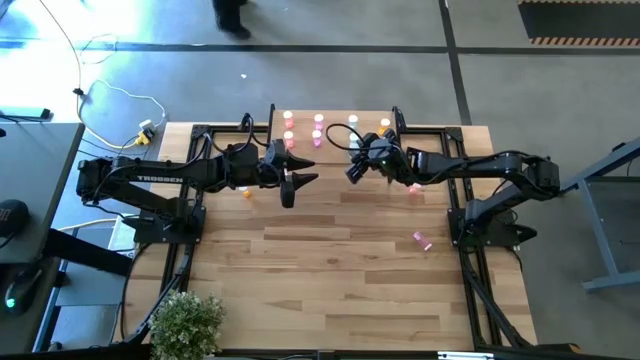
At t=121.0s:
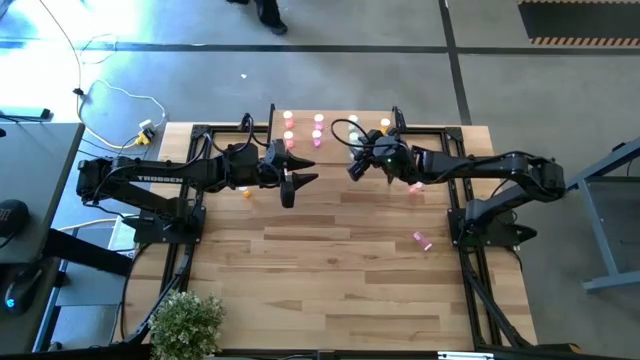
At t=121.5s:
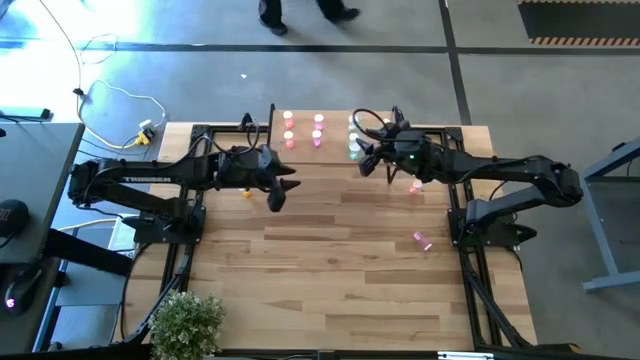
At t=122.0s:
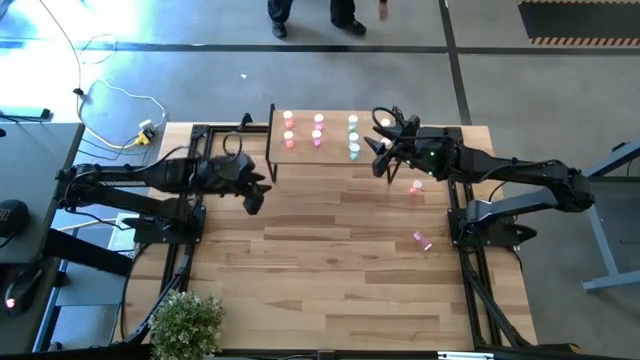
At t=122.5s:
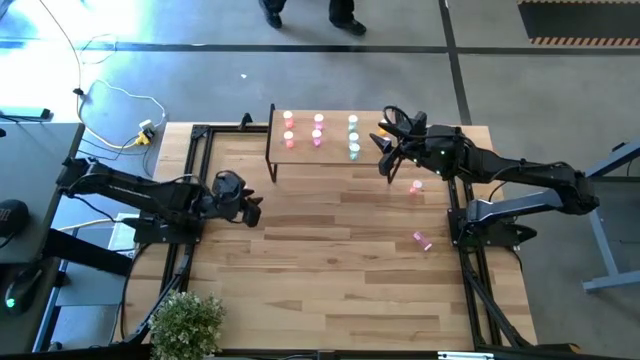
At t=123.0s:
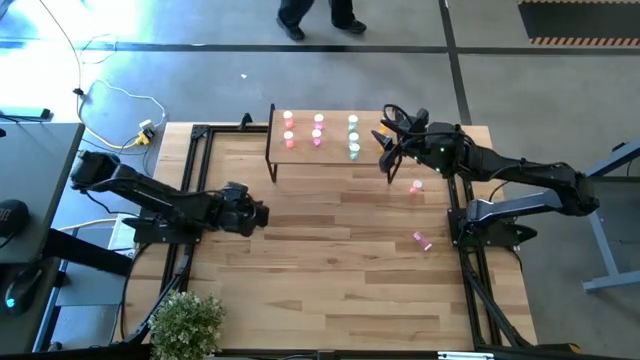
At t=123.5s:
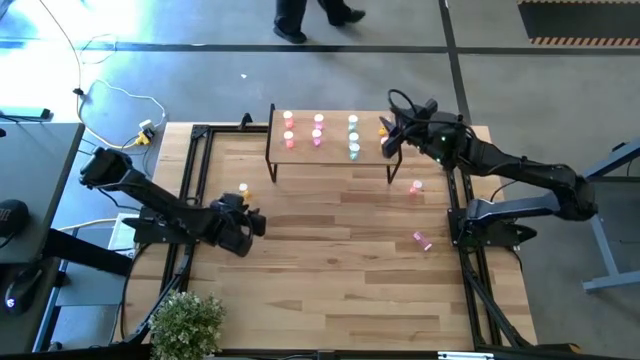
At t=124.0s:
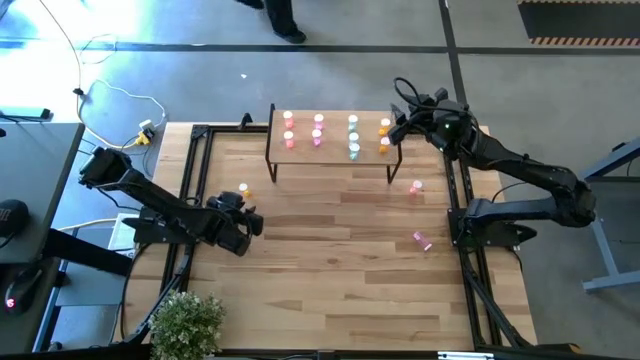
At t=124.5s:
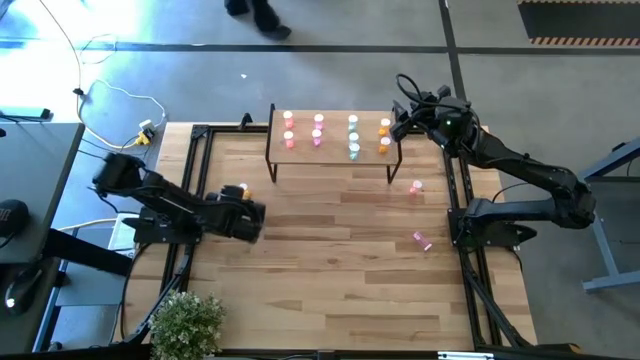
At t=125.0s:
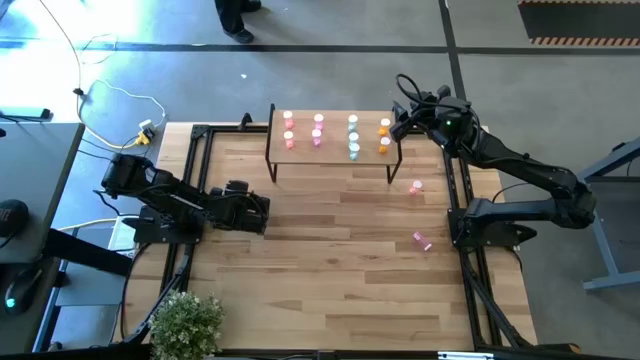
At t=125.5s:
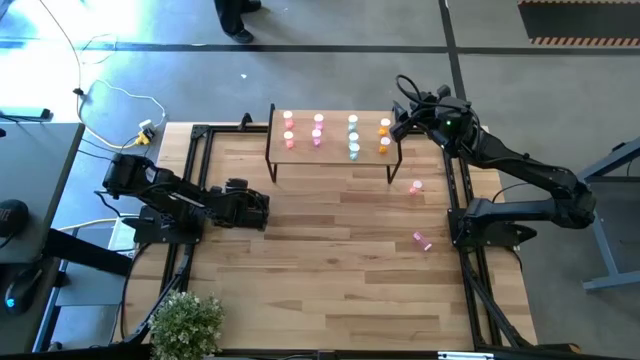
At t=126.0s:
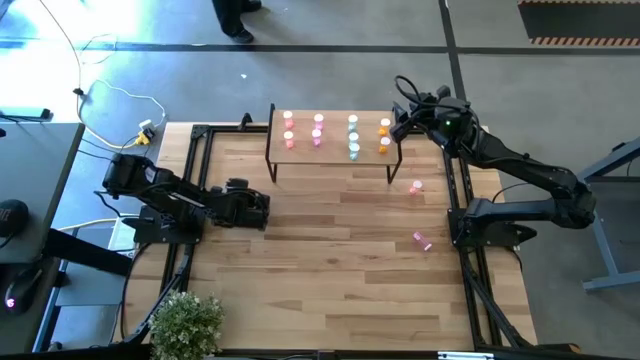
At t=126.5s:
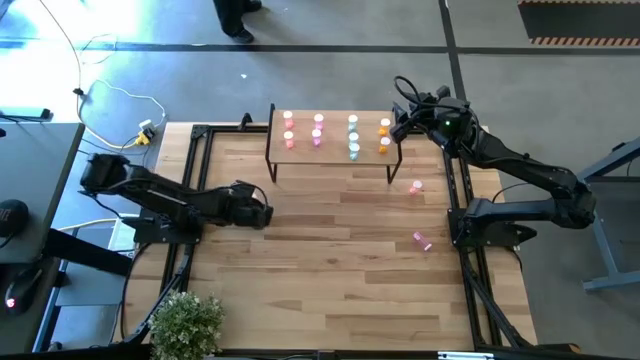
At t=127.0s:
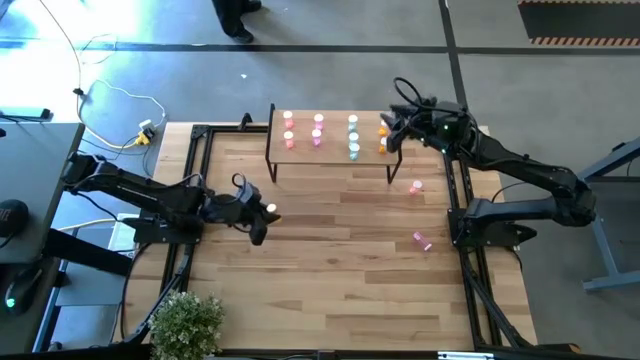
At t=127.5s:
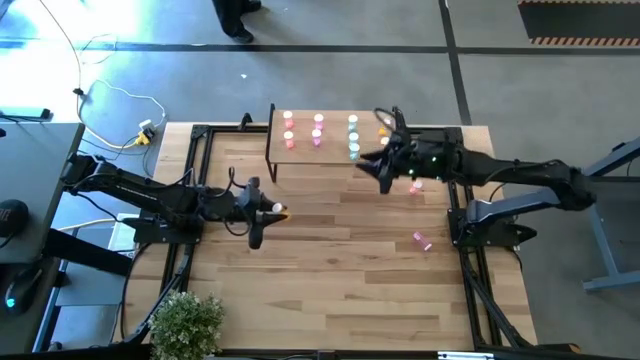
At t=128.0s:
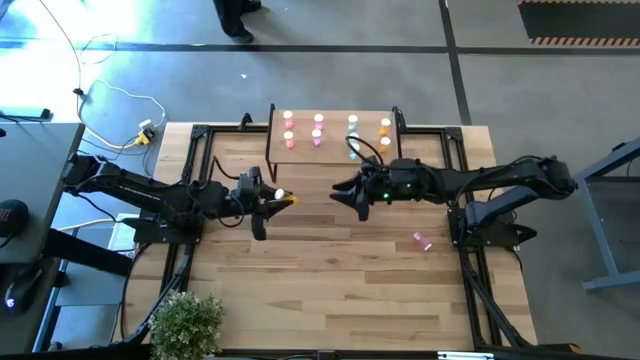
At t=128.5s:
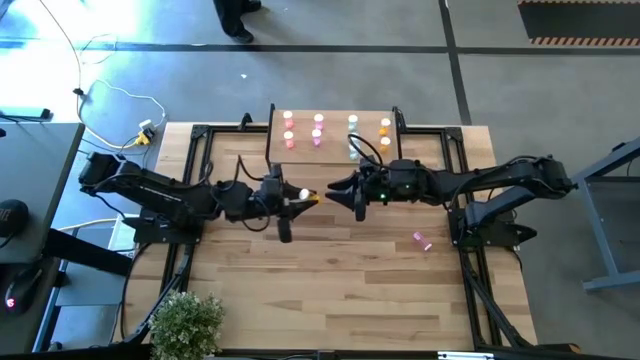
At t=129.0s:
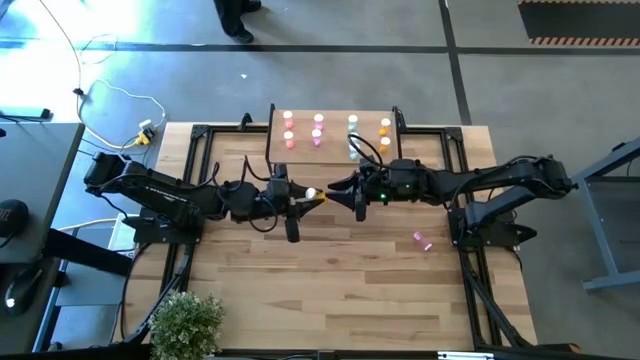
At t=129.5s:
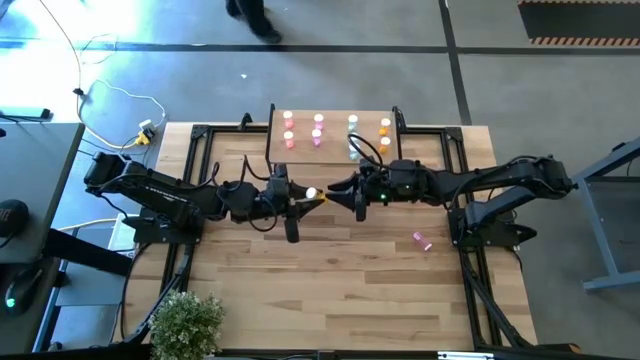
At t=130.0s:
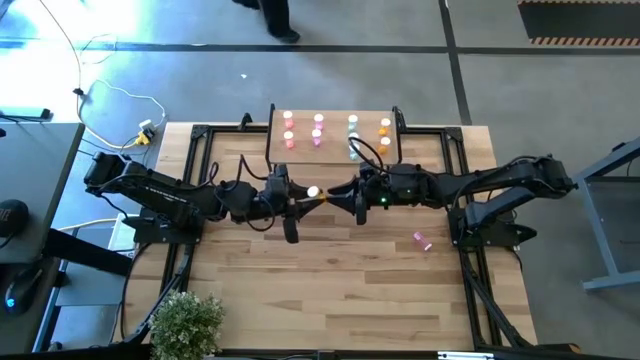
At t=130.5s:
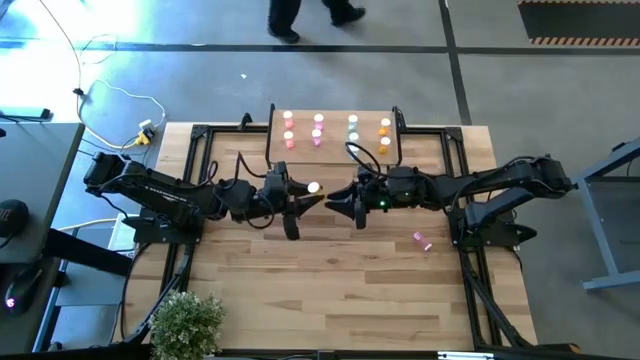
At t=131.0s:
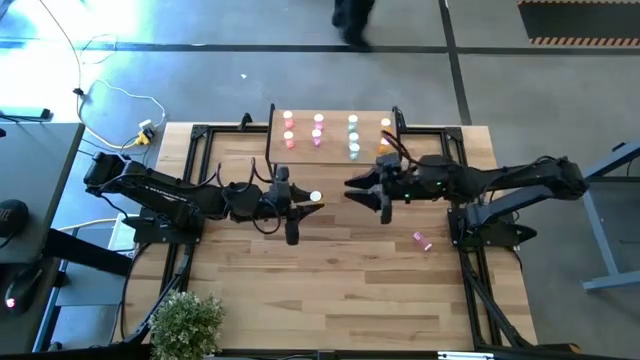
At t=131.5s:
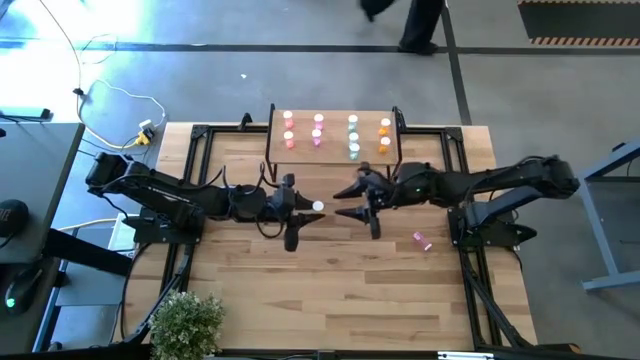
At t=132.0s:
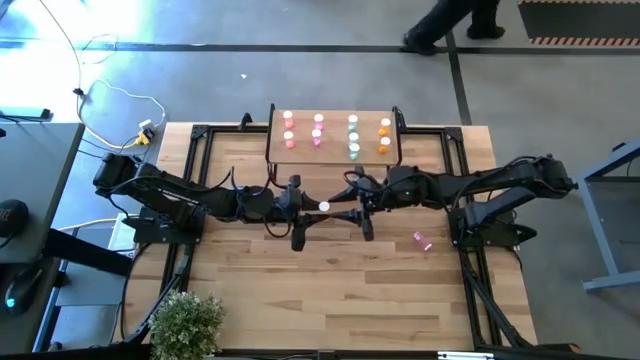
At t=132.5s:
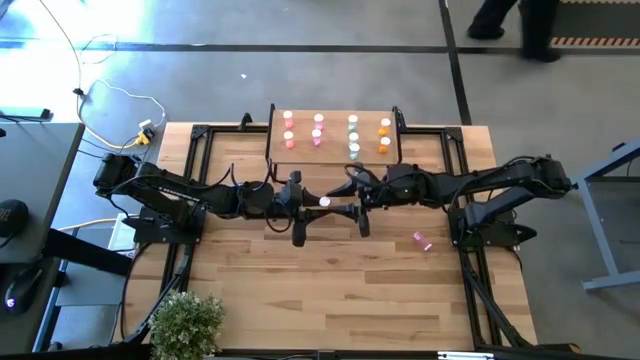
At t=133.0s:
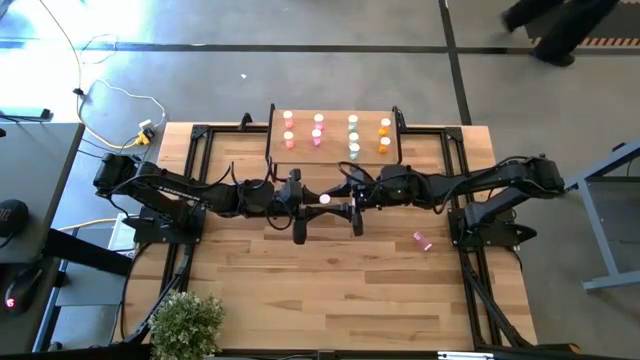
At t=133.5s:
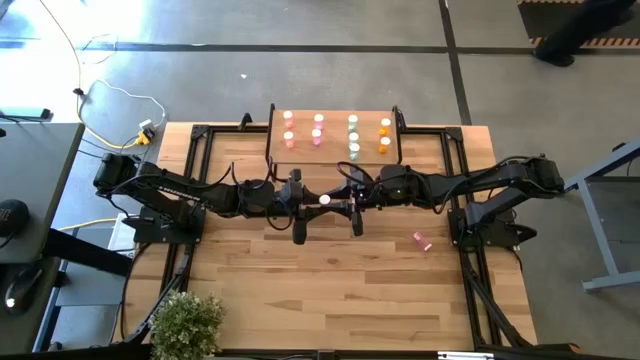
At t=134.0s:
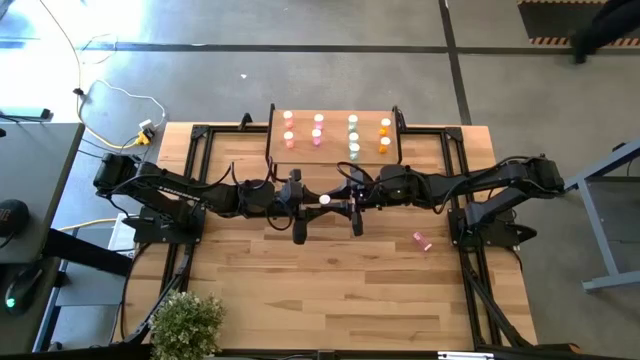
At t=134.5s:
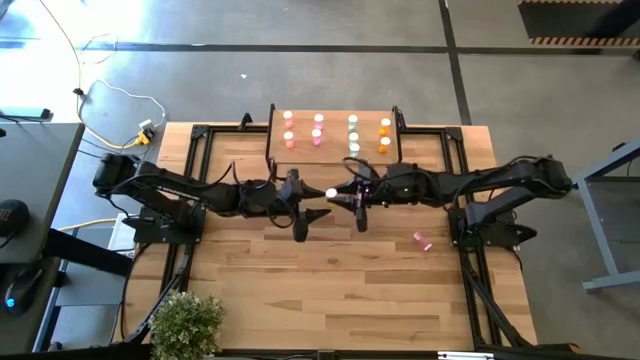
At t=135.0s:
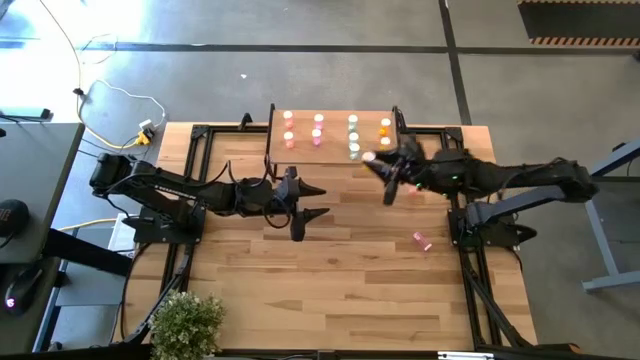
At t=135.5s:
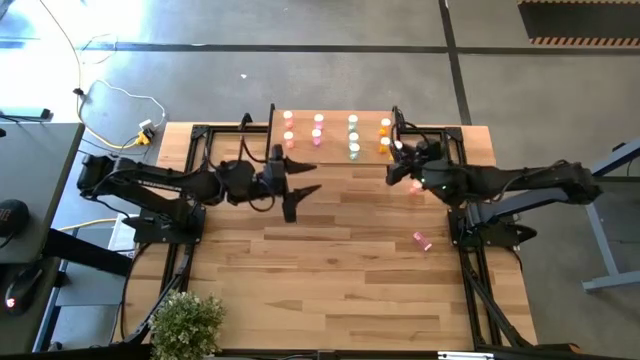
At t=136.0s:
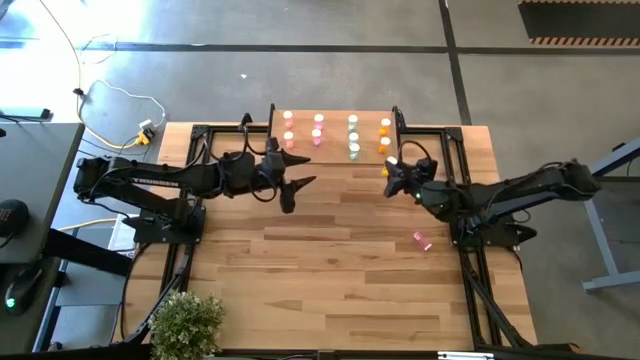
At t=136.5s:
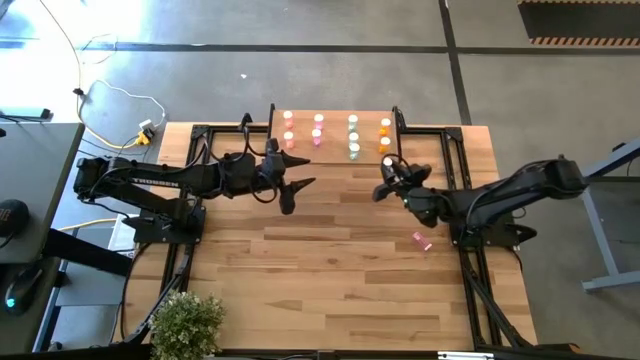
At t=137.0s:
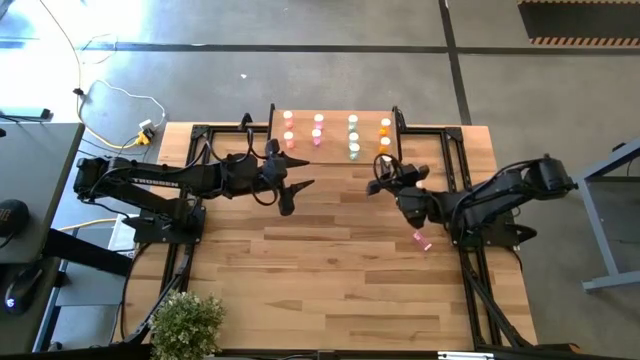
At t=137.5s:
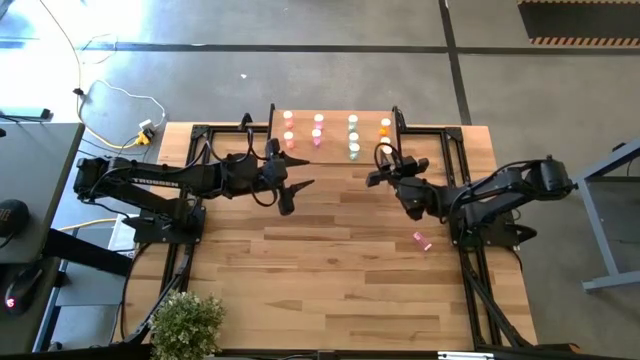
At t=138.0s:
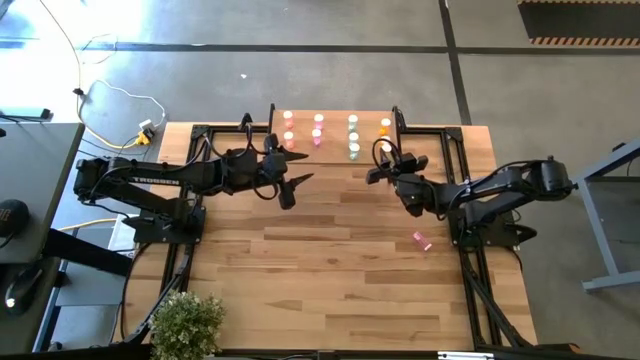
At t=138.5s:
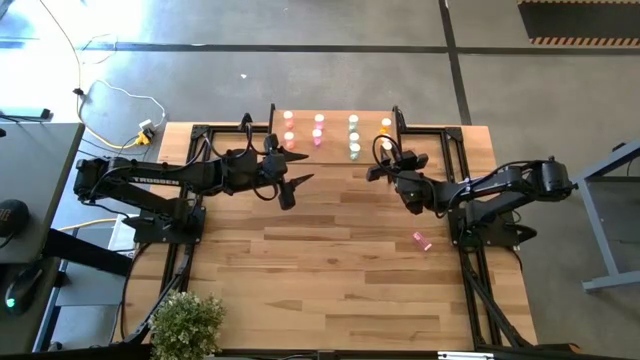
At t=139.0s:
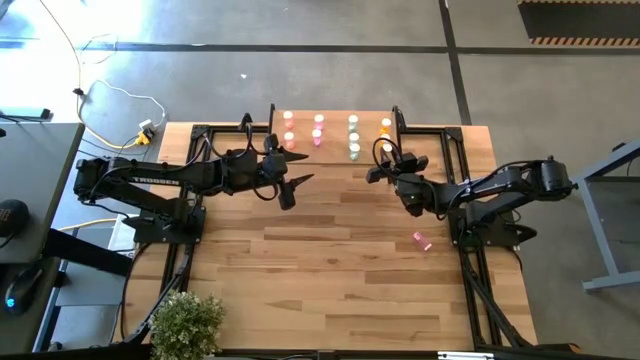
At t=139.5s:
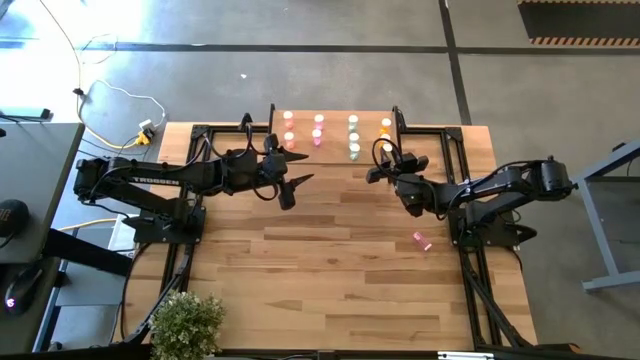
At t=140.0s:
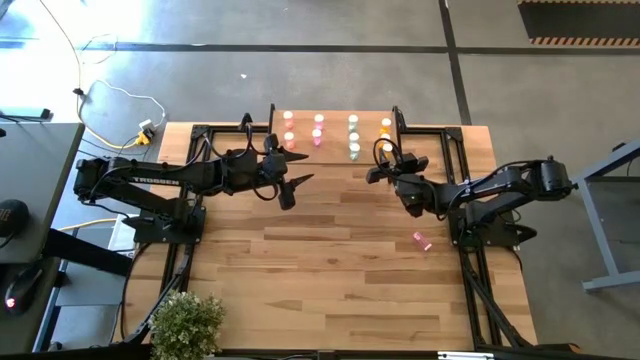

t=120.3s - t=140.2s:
Task: Pick and place medicine bottles onto shelf by color
Put the orange pill bottle aligned with the other orange pill bottles on the shelf

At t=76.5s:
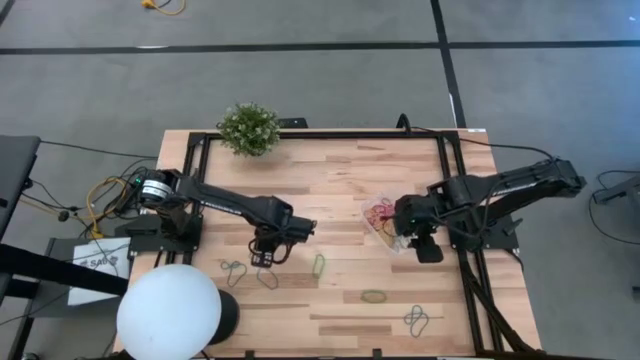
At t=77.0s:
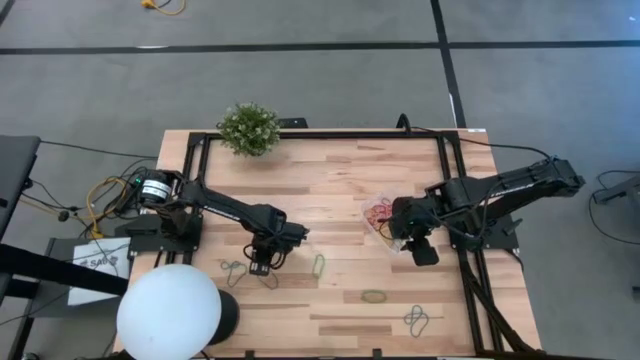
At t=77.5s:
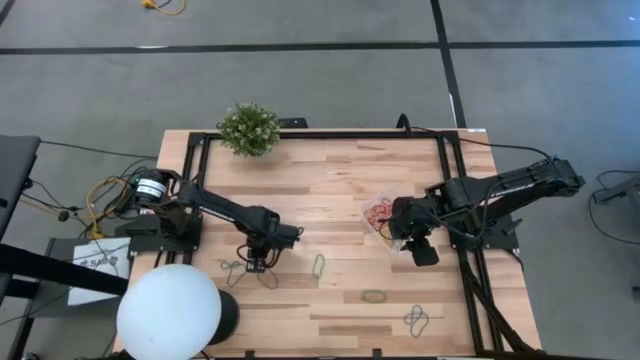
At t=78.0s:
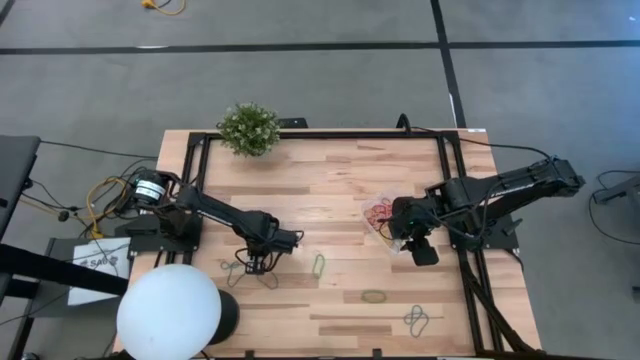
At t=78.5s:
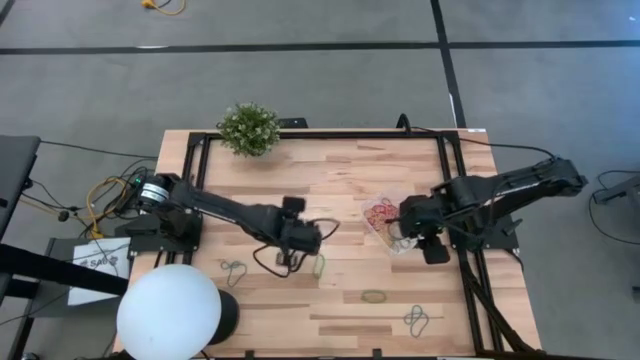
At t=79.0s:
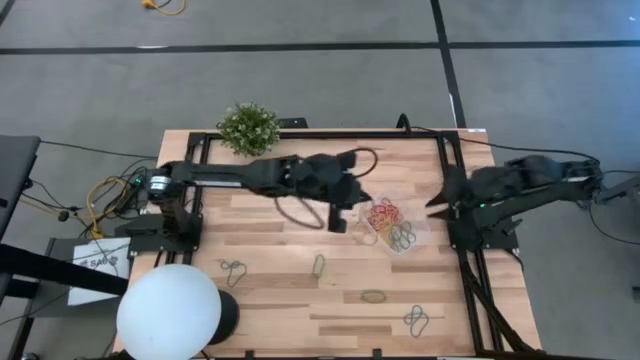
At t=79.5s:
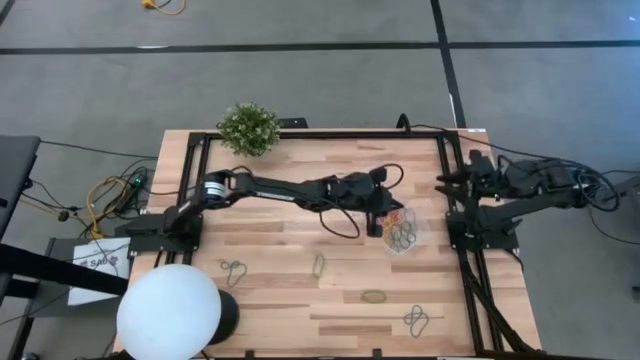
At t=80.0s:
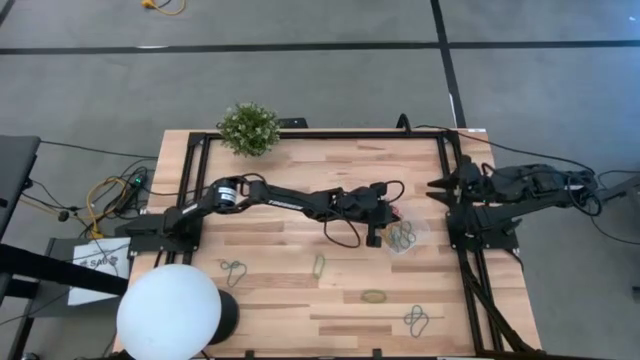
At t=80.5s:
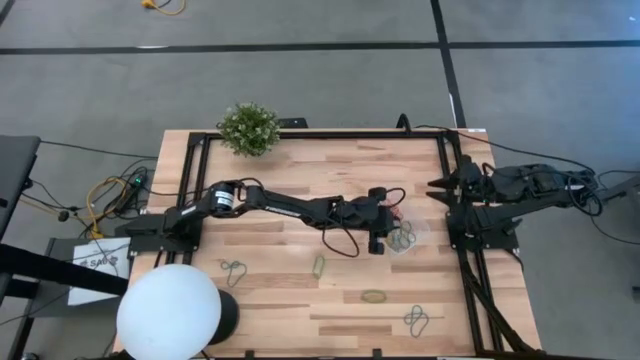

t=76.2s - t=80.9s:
Task: Pick and place items into bin
Put the blue rubber band into the transparent bin
